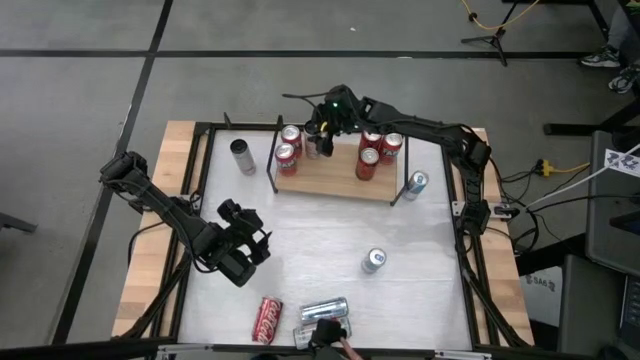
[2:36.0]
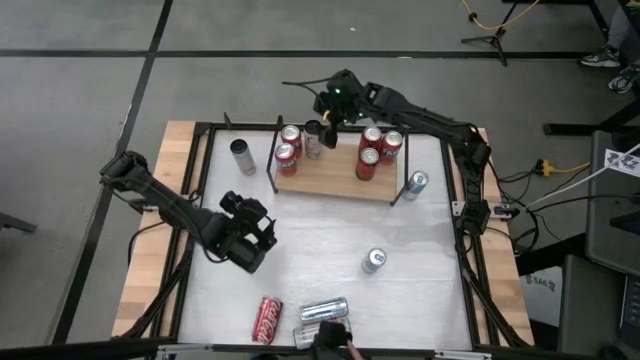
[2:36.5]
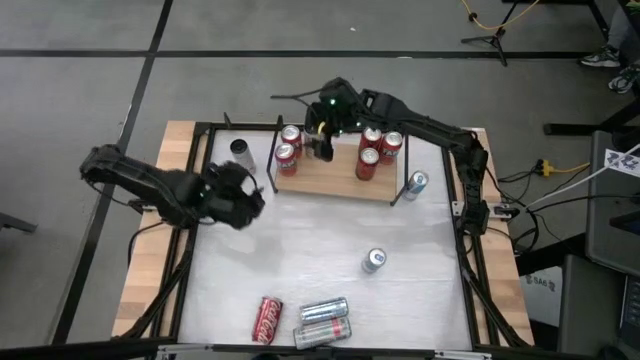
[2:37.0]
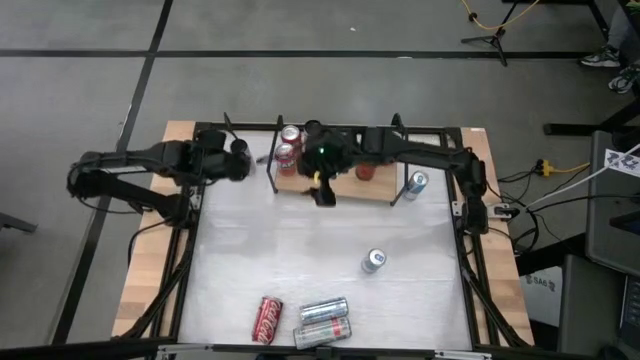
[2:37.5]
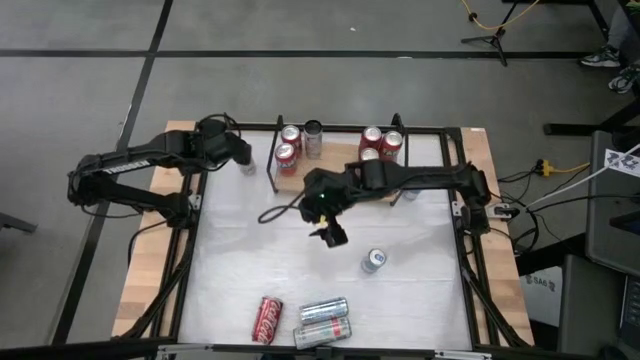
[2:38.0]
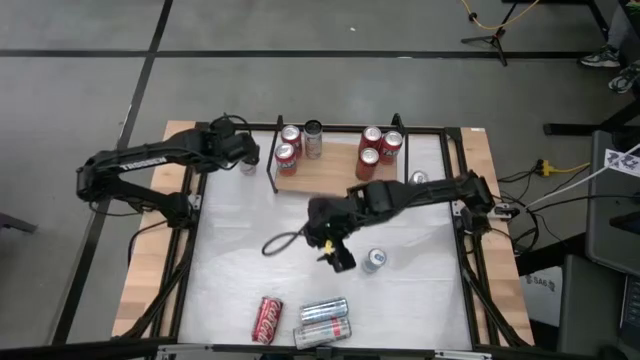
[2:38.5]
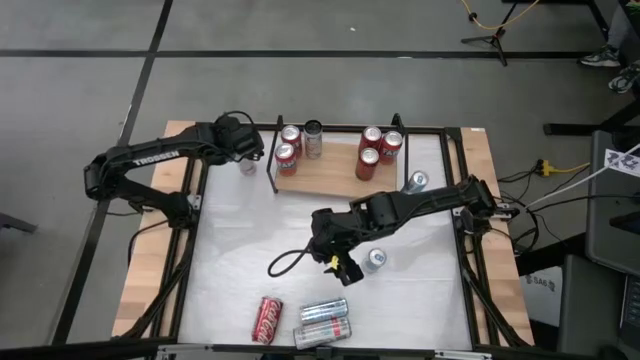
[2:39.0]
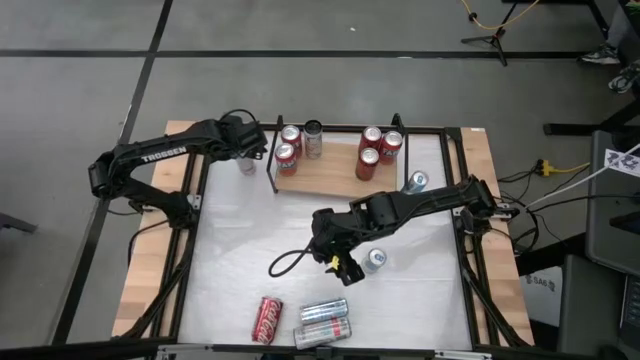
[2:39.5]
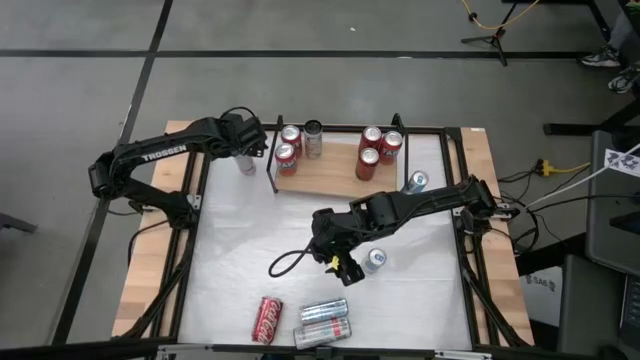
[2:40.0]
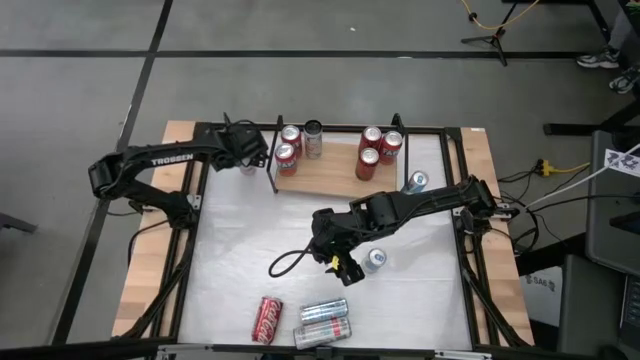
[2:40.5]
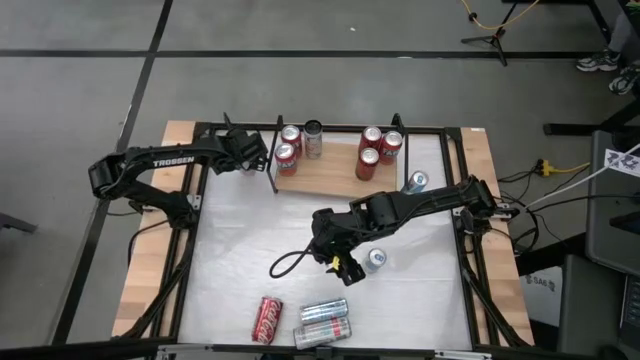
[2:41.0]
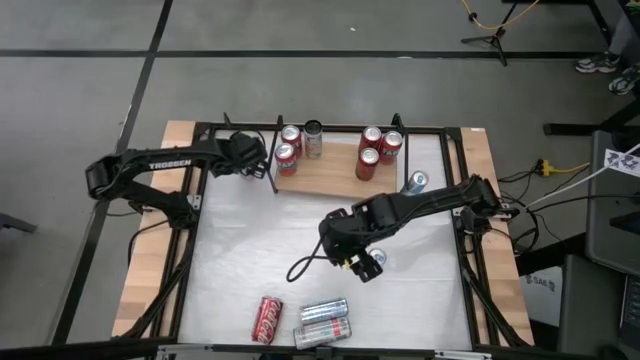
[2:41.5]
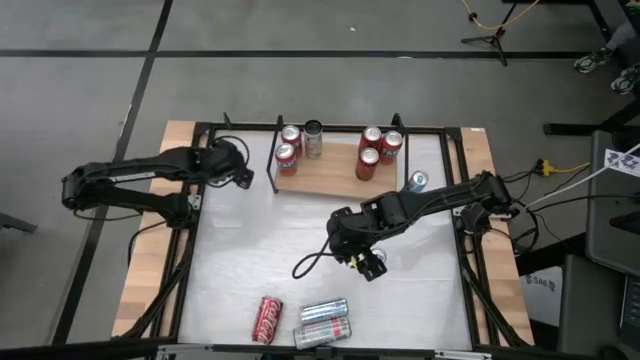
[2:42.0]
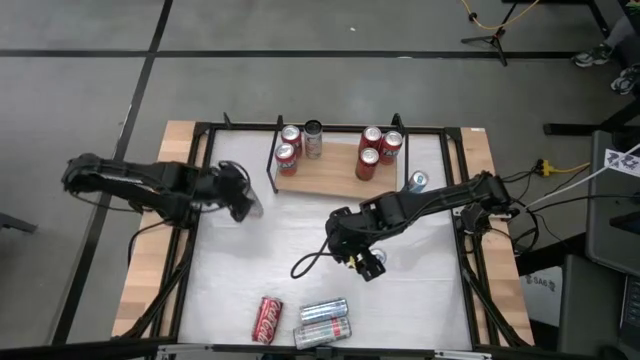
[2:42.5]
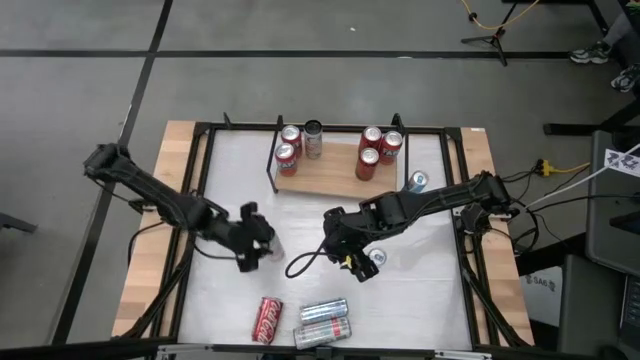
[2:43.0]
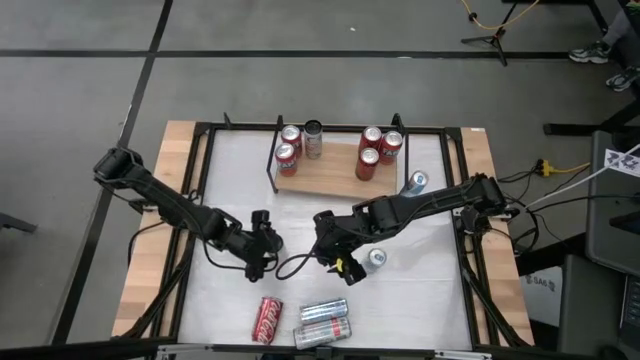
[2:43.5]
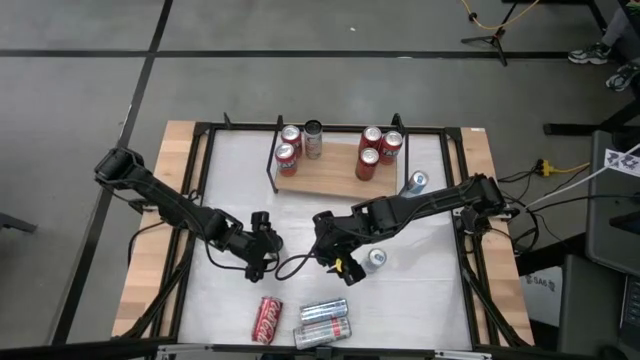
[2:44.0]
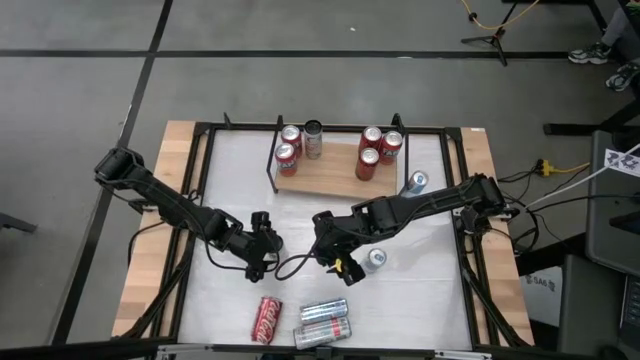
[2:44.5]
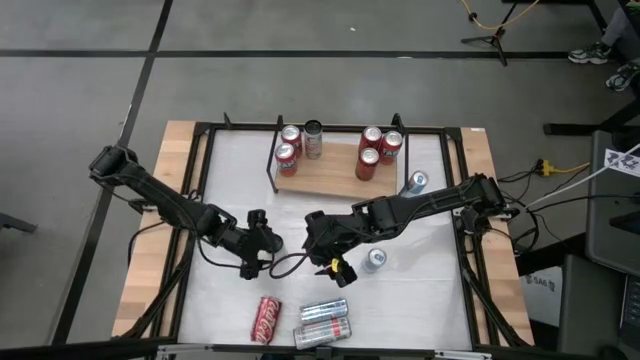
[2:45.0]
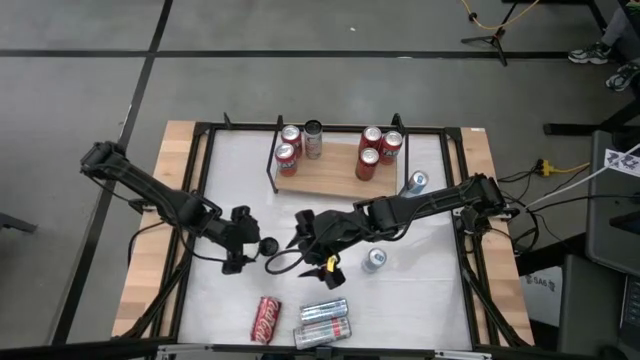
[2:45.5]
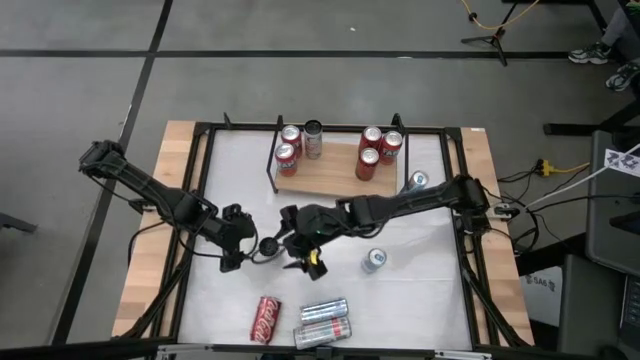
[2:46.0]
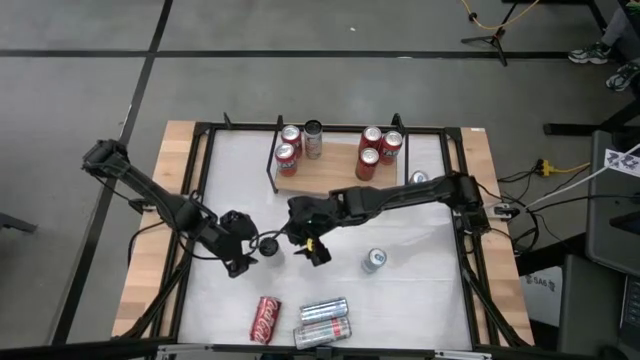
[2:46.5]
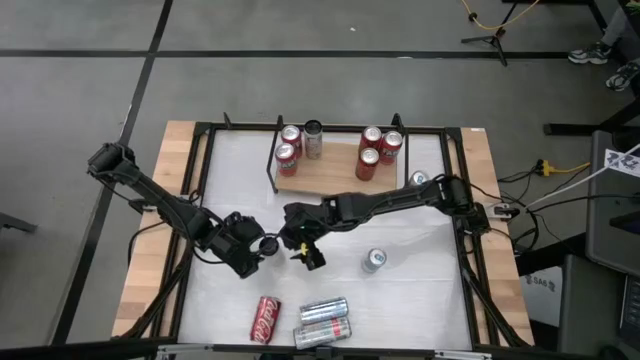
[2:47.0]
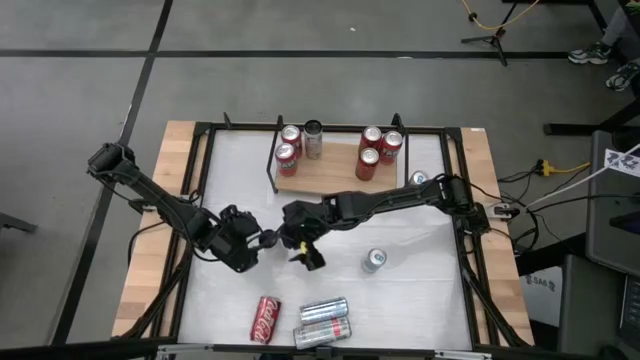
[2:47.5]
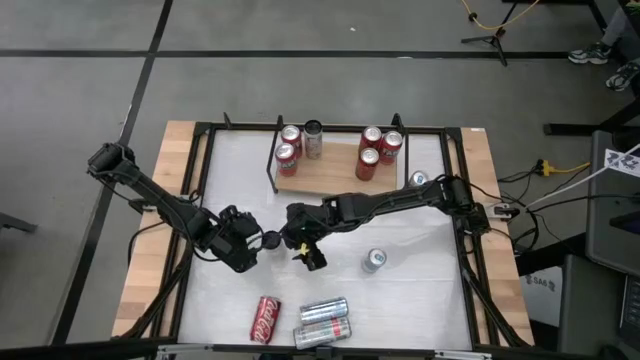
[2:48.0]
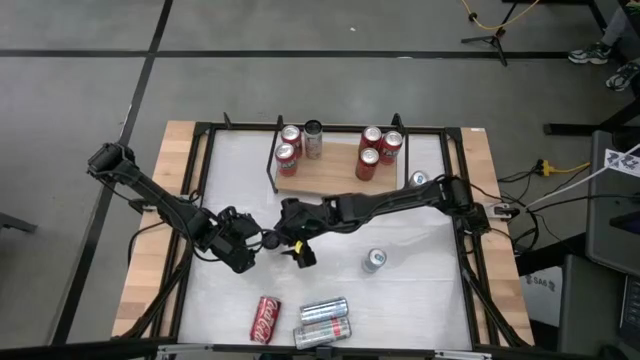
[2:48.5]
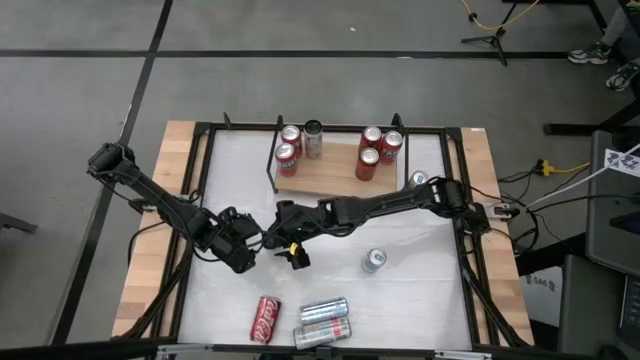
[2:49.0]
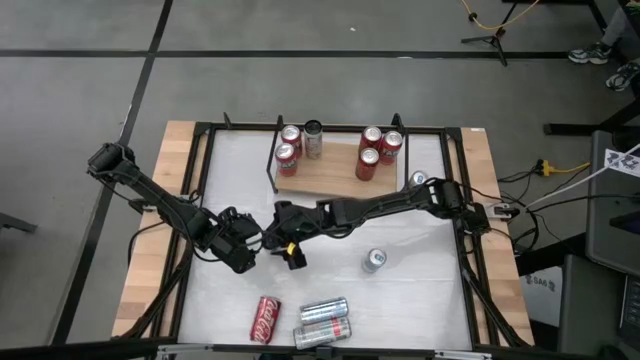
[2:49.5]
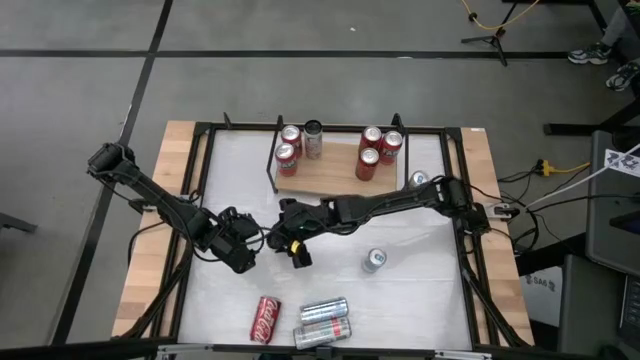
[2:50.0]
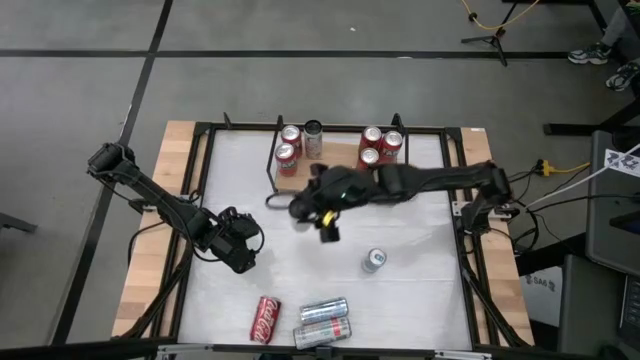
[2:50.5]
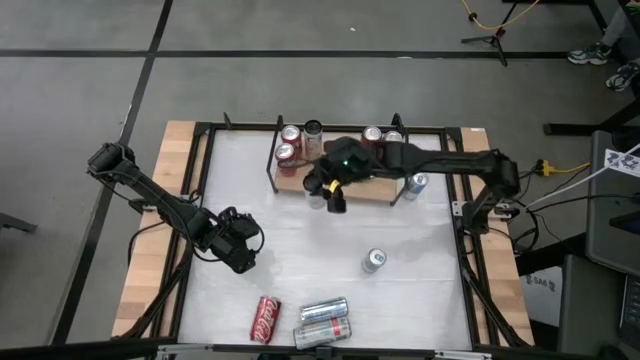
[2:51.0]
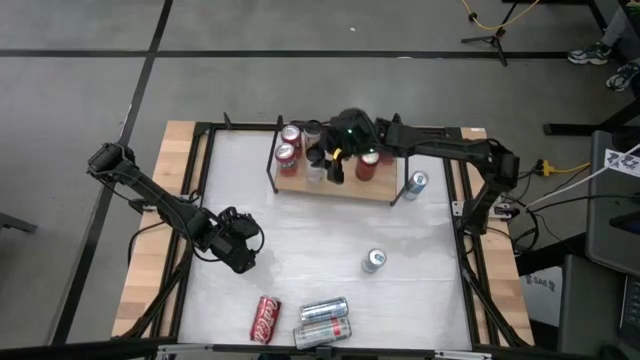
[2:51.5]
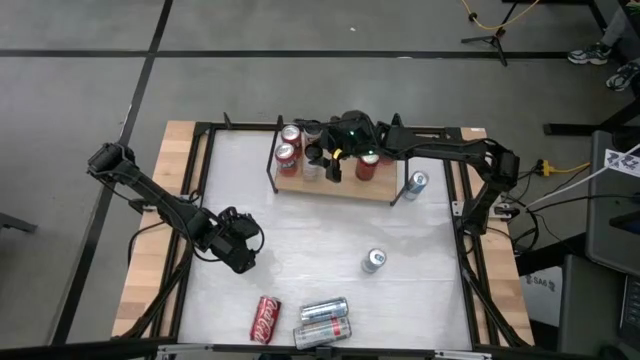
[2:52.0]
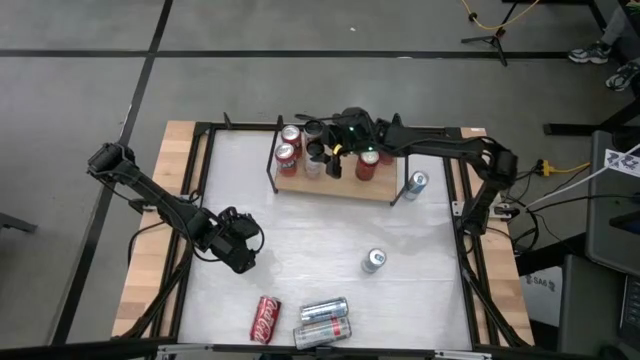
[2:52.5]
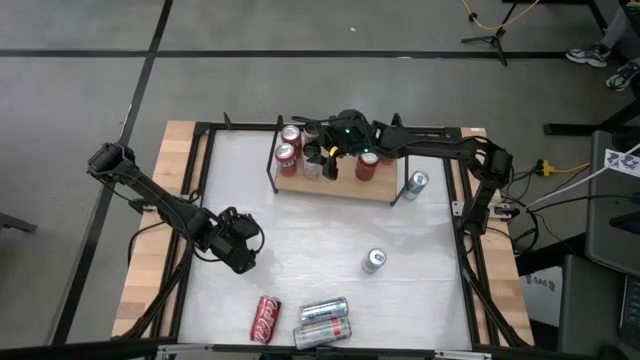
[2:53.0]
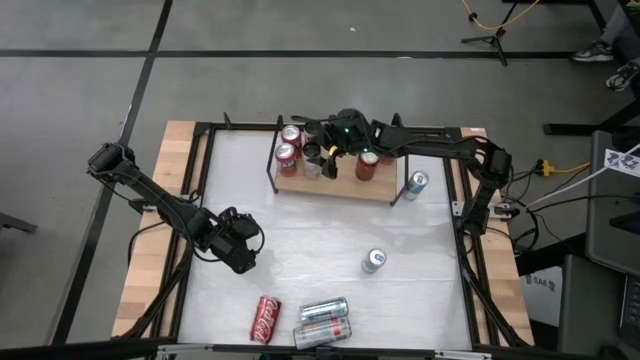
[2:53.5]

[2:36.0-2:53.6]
Task: Place canned beverage on shelf
Put the top white-pink soda can on the shelf aligned with the white-pink soda can

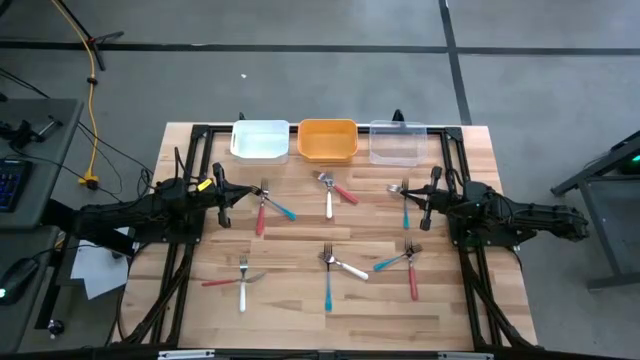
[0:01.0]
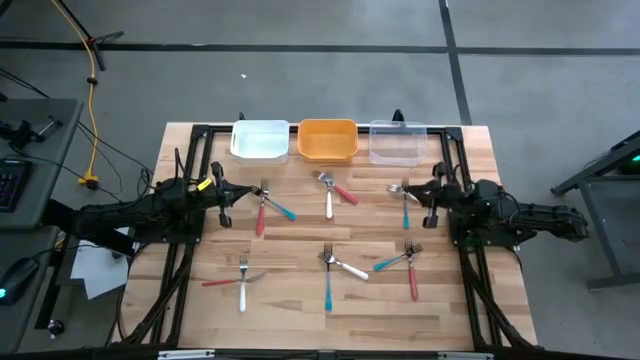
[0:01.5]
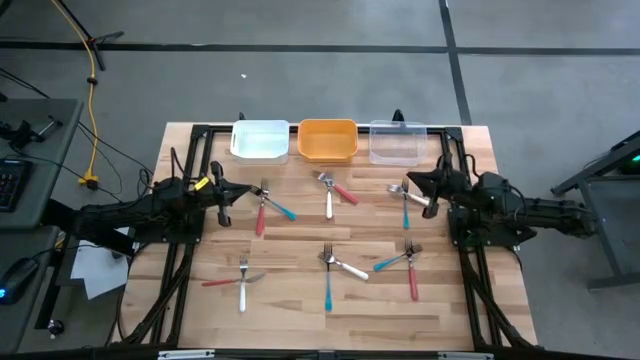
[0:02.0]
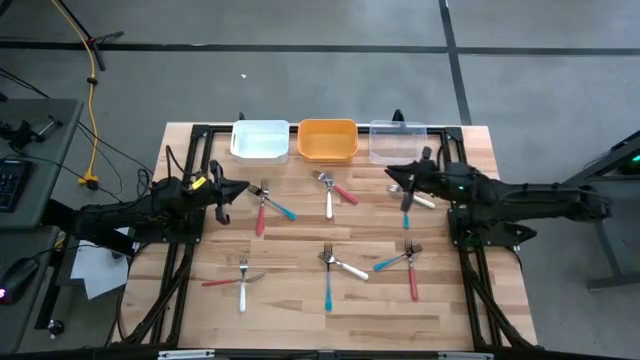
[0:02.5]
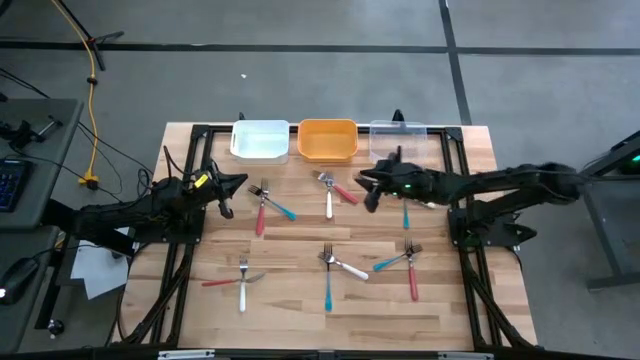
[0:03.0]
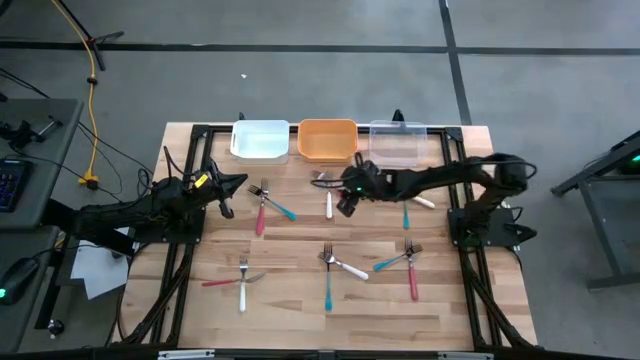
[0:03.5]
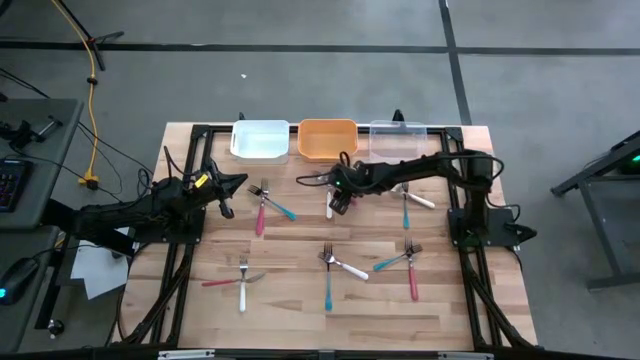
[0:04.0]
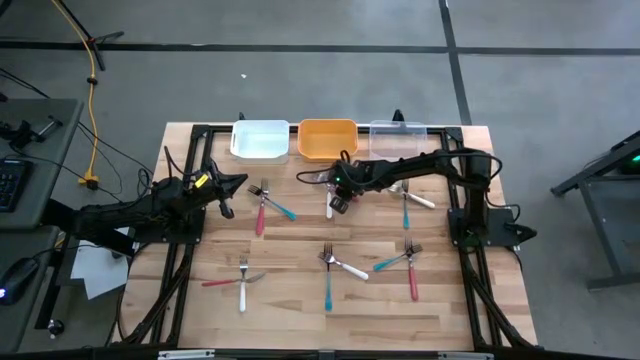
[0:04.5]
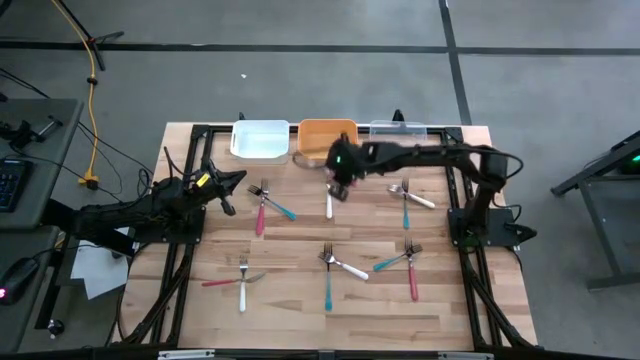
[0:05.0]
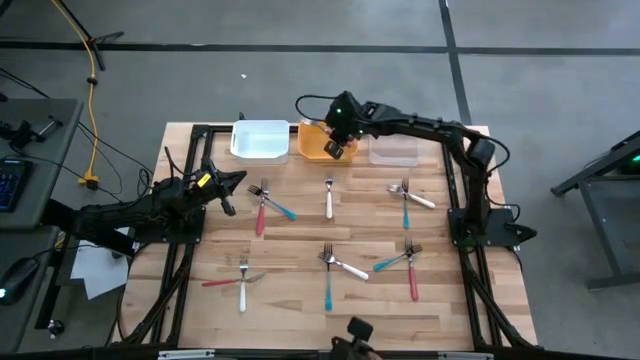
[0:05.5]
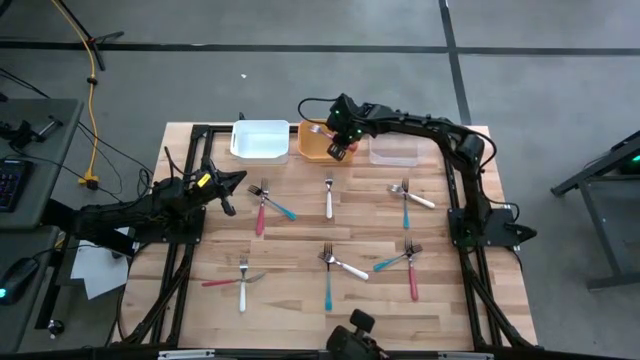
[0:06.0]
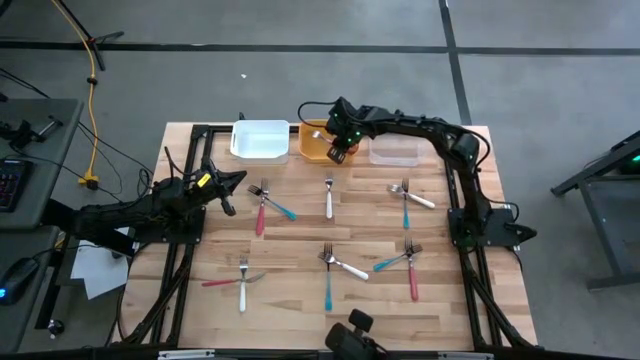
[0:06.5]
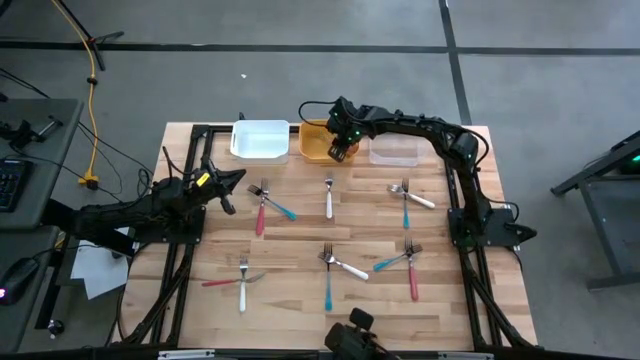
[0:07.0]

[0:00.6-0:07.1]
Task: Sort silverware by color (type)
Put the top center pink fork into the yellow bin
